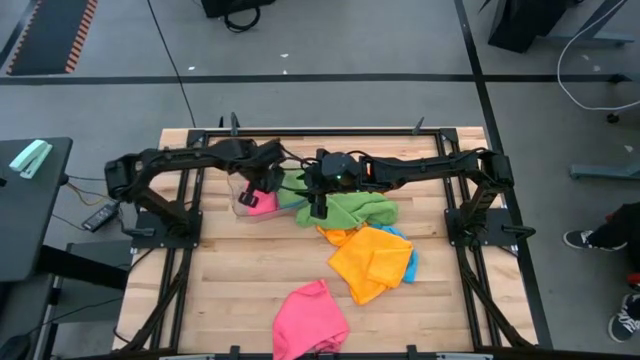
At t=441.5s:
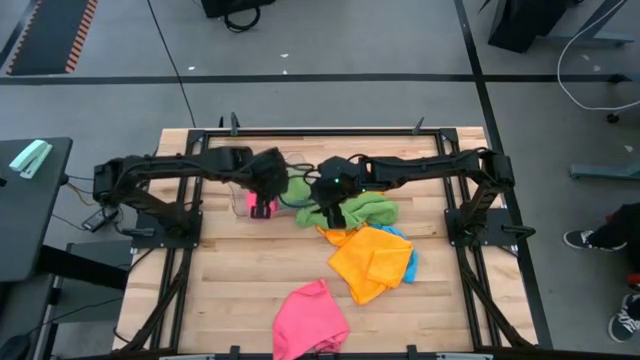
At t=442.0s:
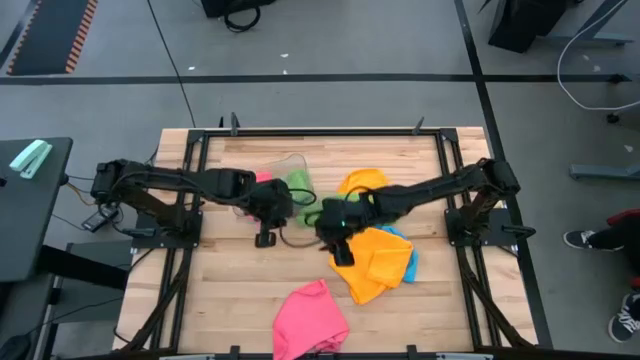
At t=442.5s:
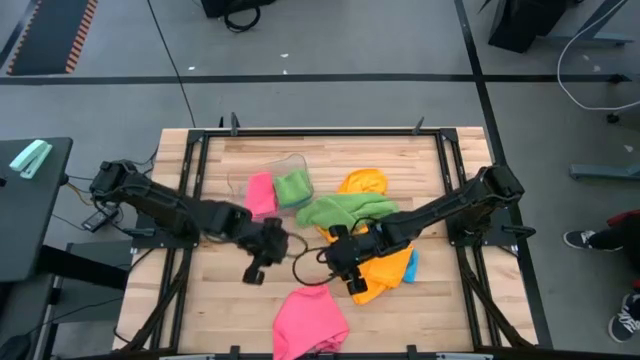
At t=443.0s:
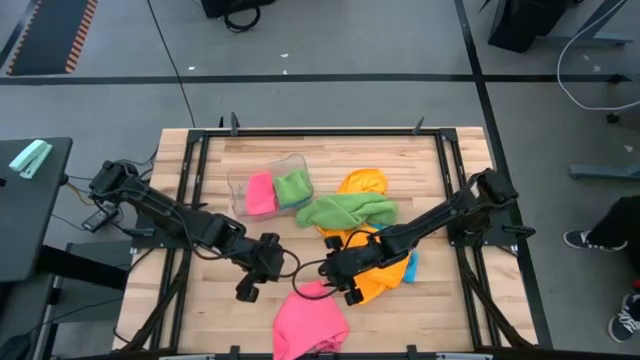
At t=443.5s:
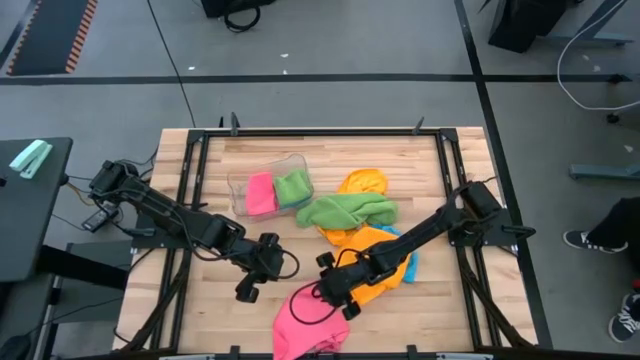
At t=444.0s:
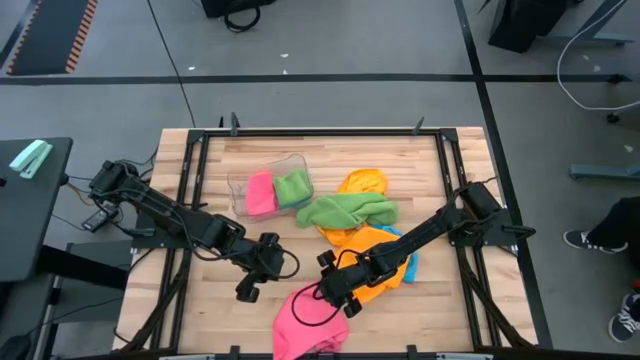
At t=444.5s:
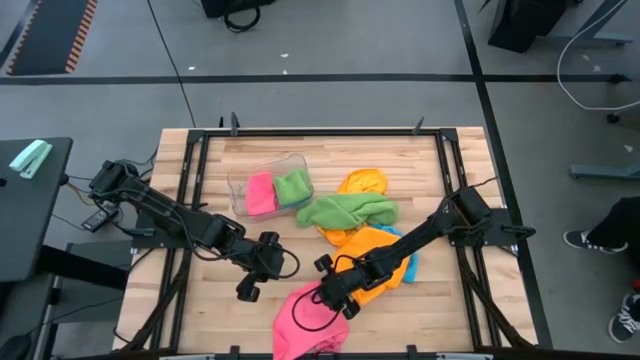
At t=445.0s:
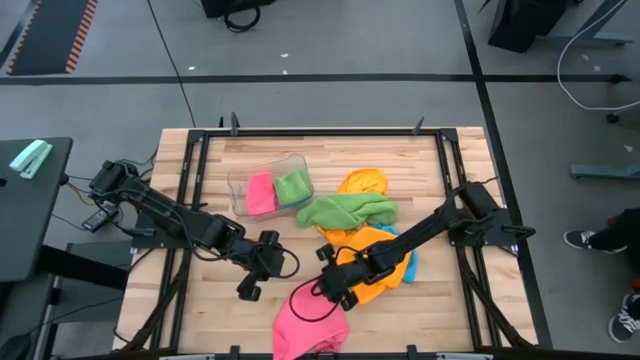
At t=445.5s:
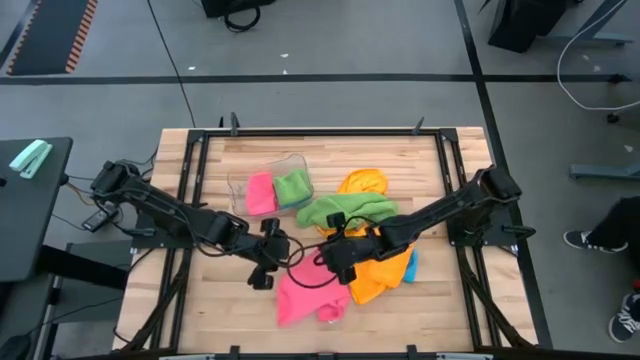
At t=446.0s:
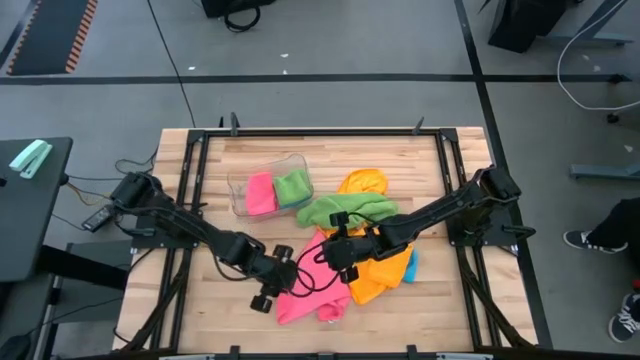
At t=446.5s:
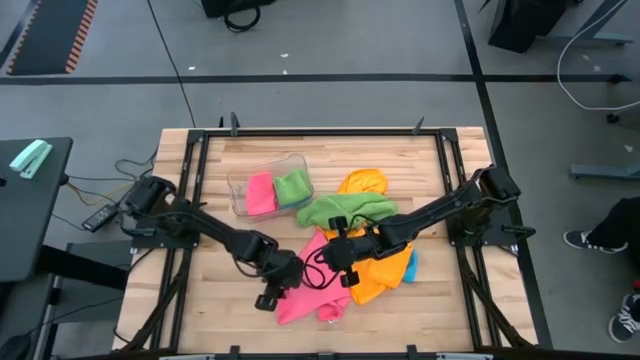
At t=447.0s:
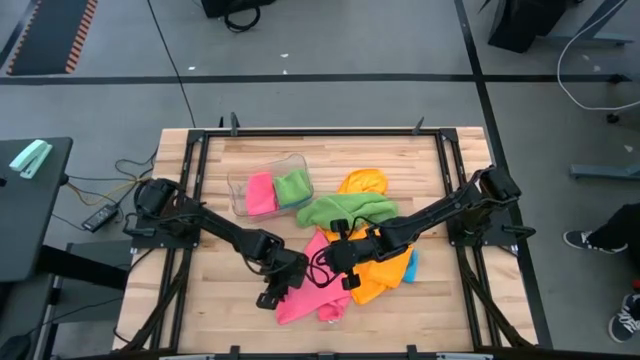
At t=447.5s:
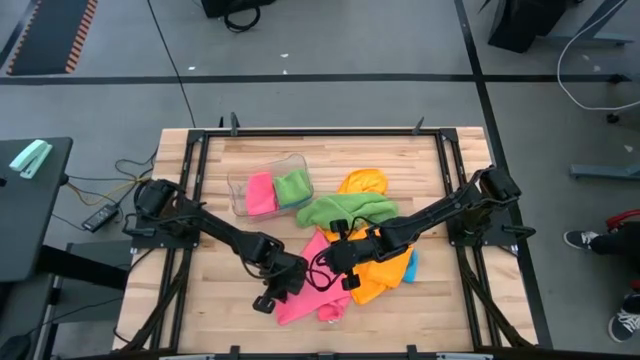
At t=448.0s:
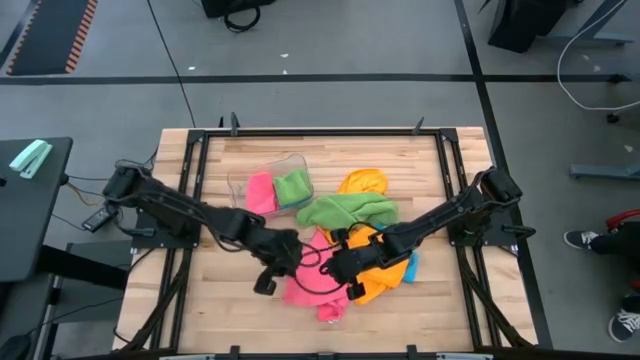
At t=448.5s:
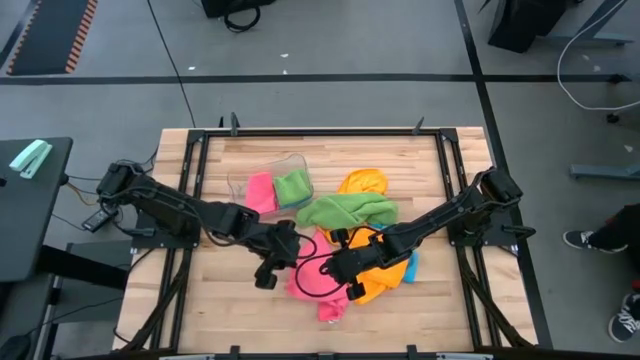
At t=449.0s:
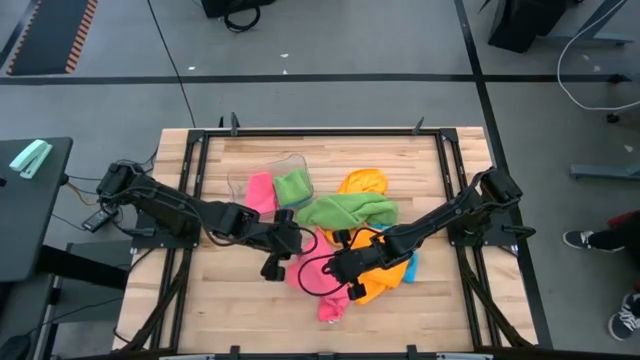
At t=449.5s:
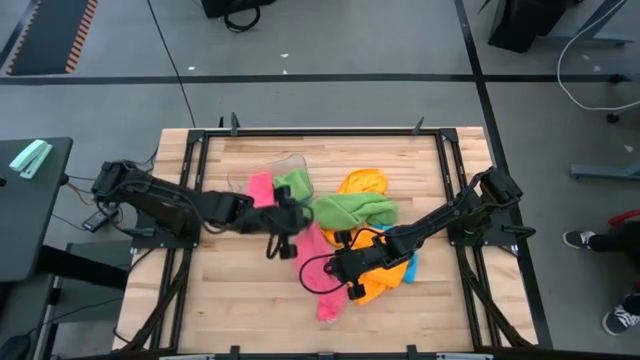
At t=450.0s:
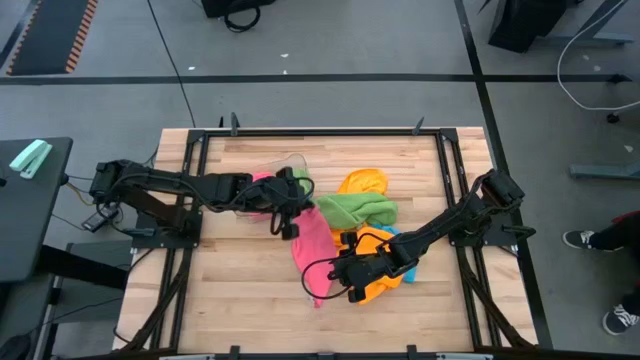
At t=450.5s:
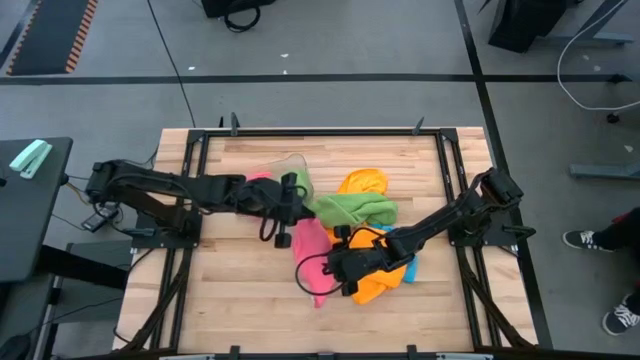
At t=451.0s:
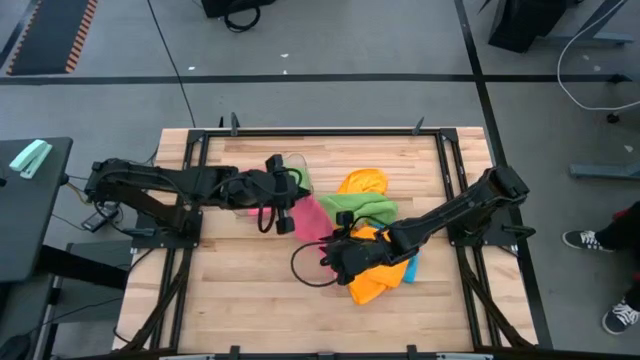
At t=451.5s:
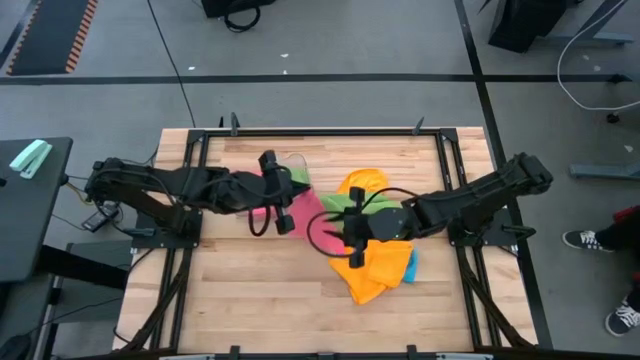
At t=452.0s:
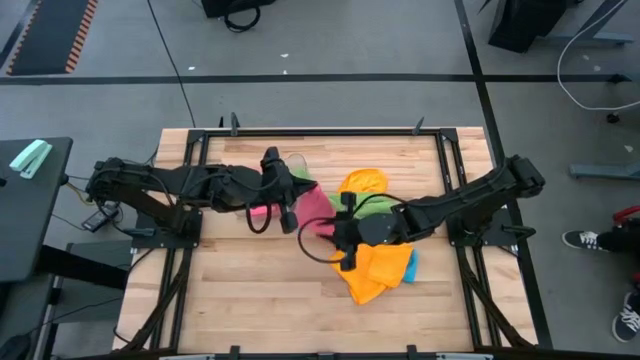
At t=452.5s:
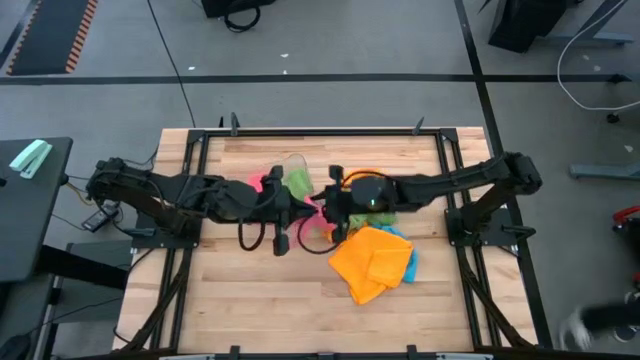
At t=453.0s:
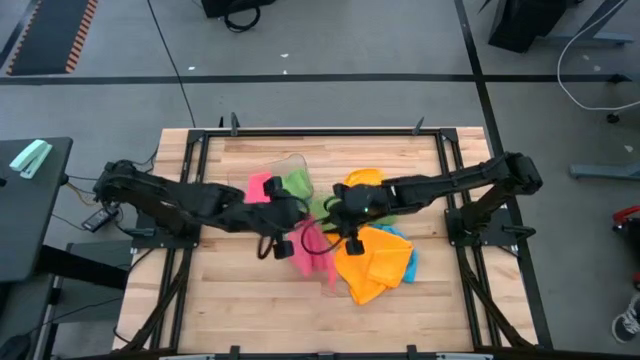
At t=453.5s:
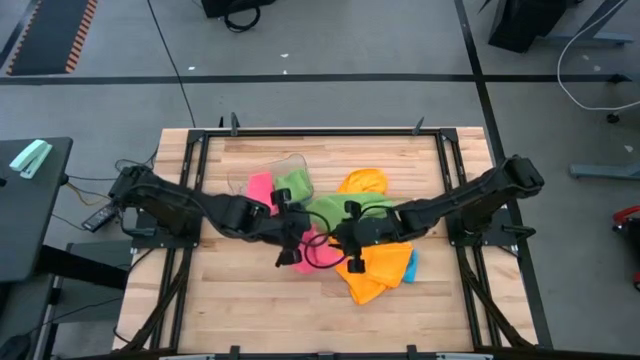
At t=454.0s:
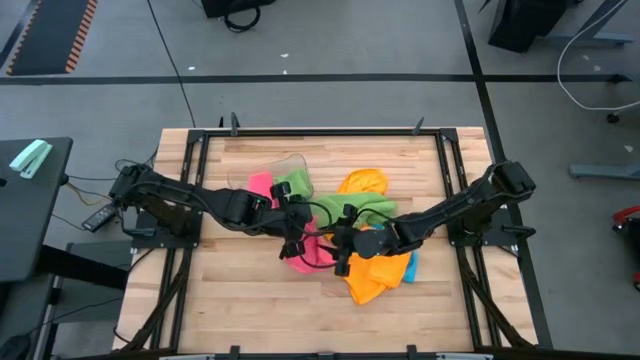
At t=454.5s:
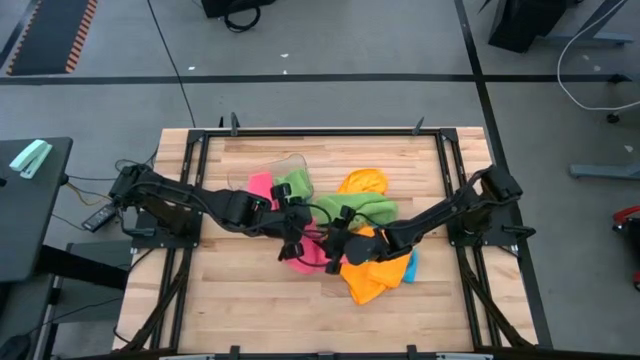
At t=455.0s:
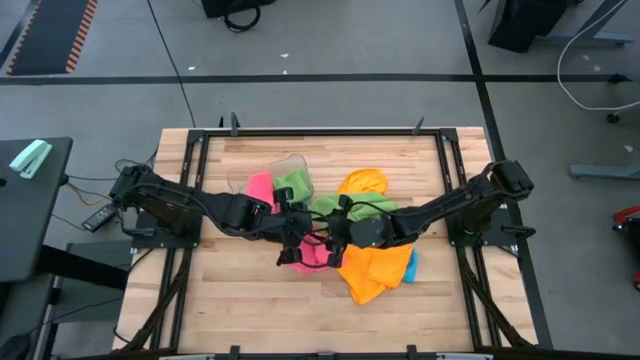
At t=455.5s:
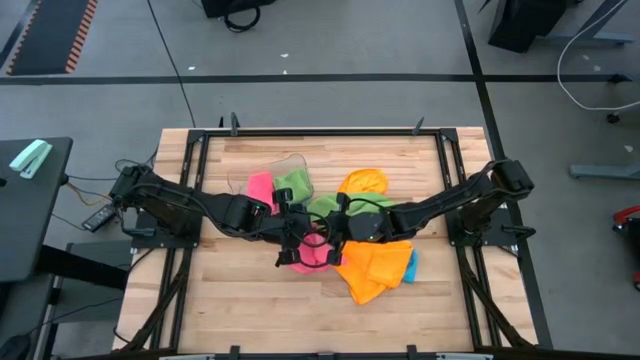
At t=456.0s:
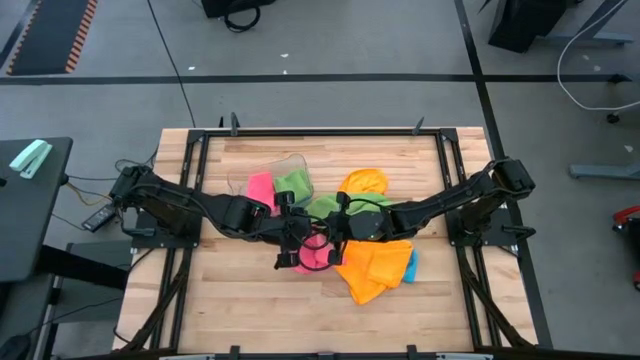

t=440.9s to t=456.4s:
Task: Fold microfiber towels
Fold the pink microfiber towel

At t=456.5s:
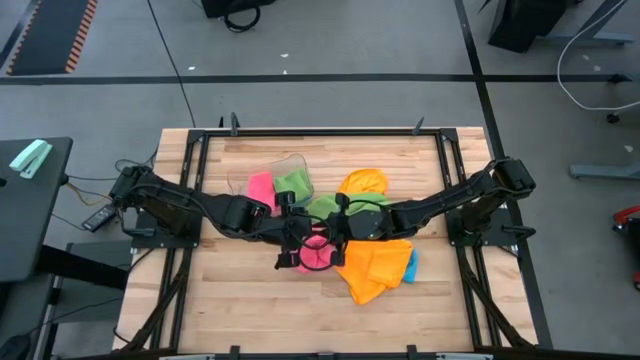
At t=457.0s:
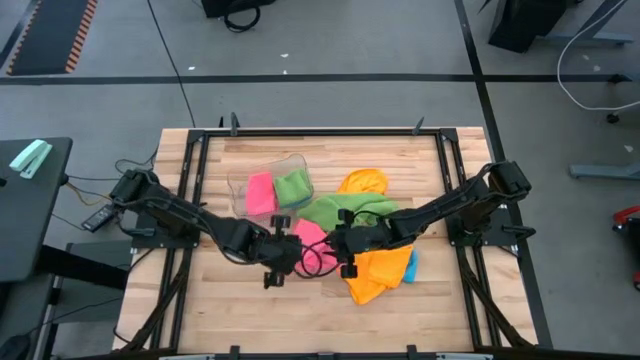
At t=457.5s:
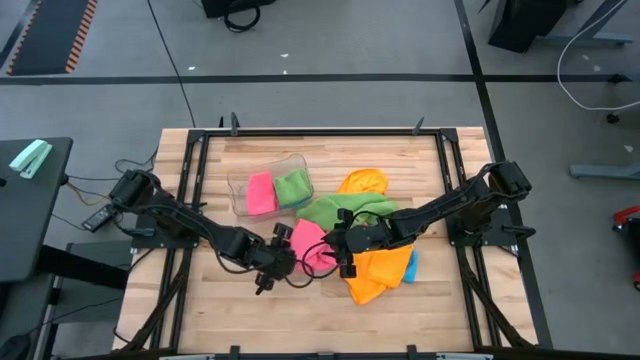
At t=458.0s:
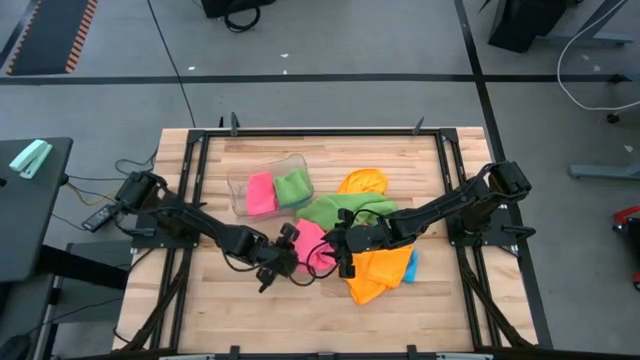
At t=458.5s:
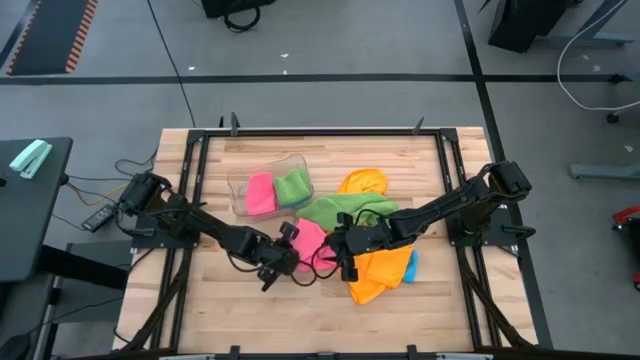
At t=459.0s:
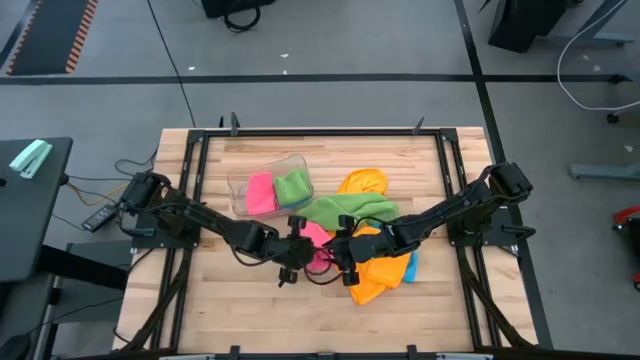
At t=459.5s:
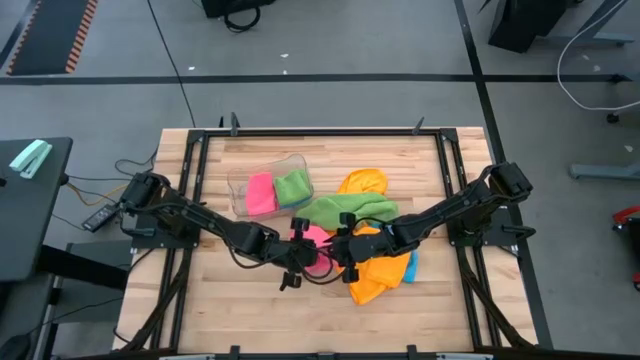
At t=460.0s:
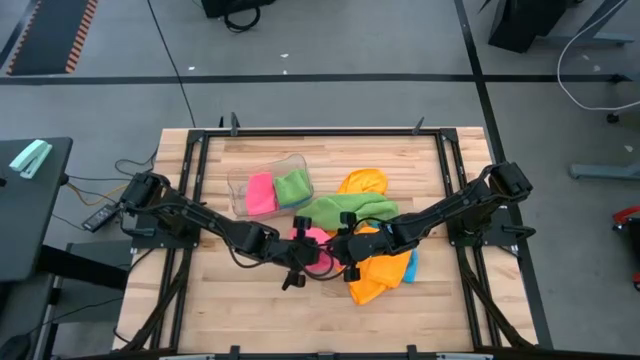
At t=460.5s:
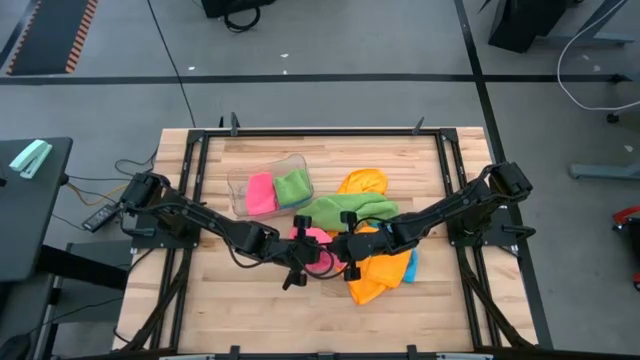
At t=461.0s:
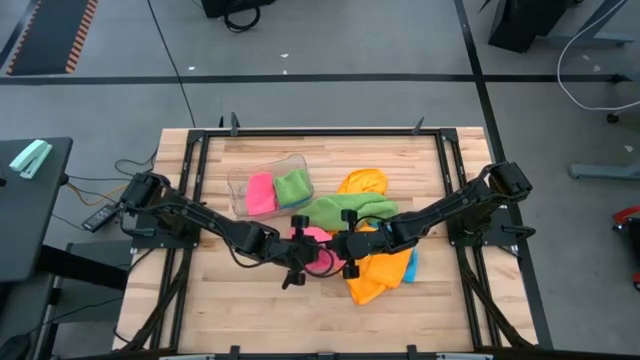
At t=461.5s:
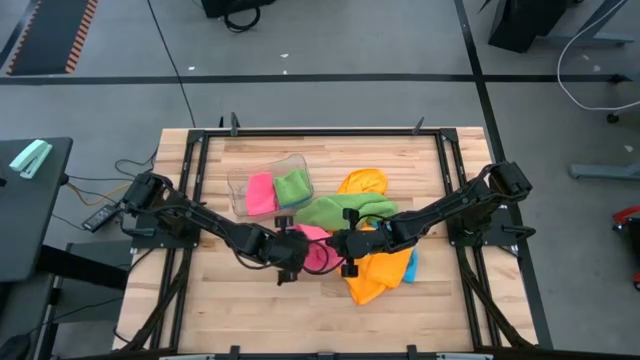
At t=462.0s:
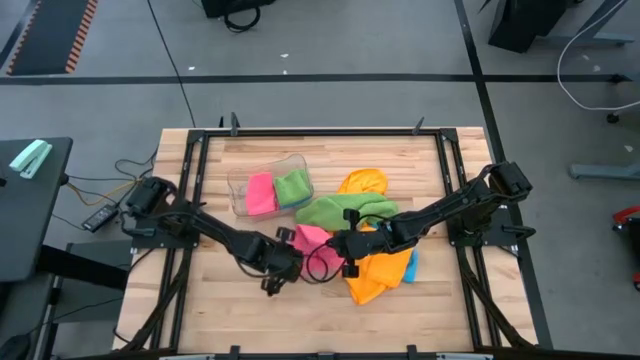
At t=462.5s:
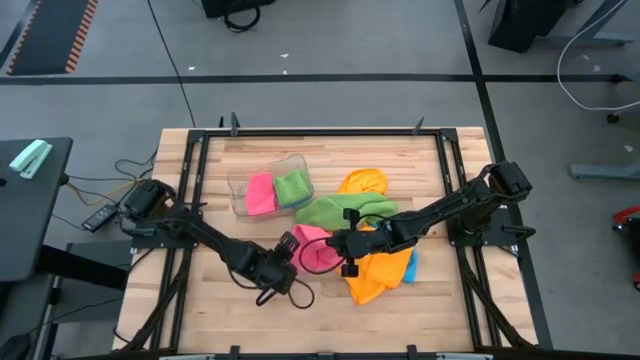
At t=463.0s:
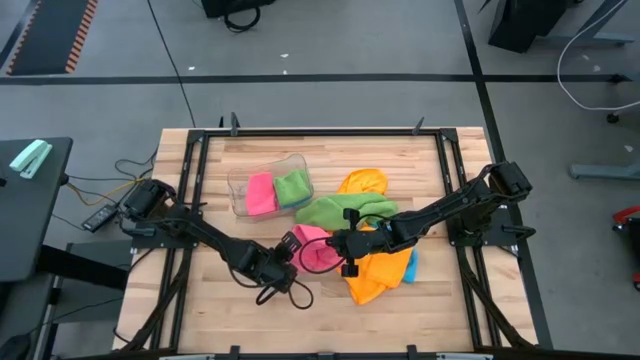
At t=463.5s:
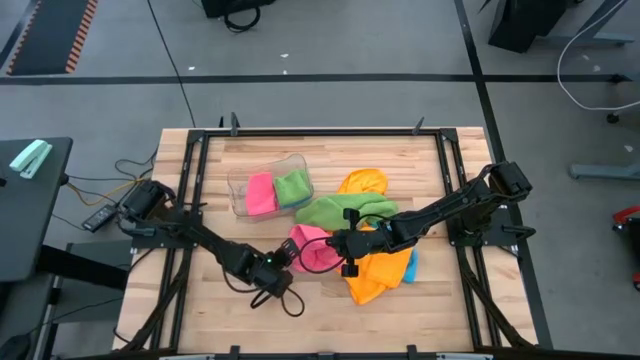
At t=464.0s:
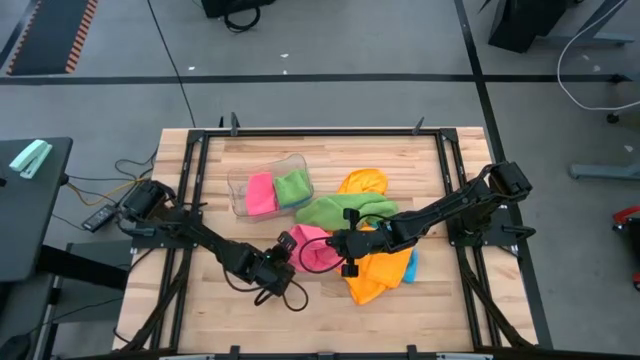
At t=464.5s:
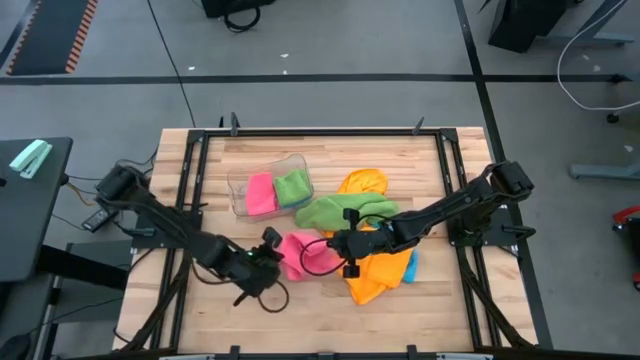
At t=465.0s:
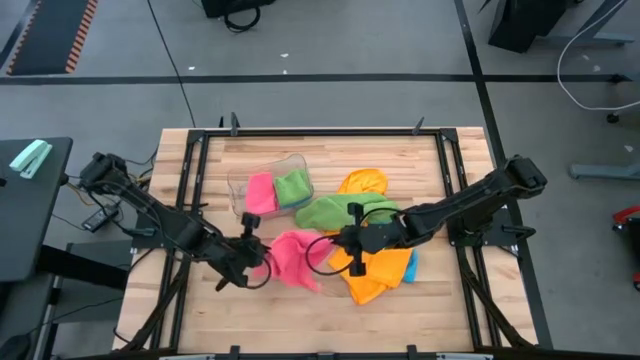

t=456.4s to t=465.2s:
Fold the pink microfiber towel
